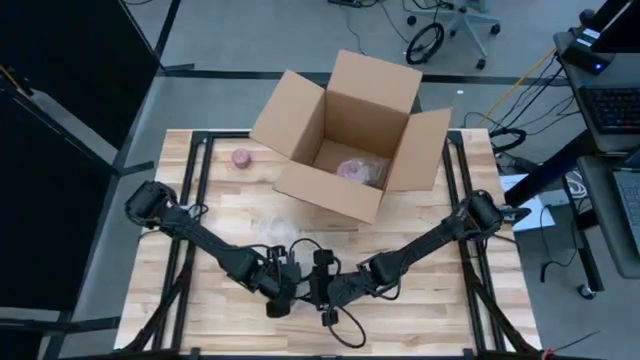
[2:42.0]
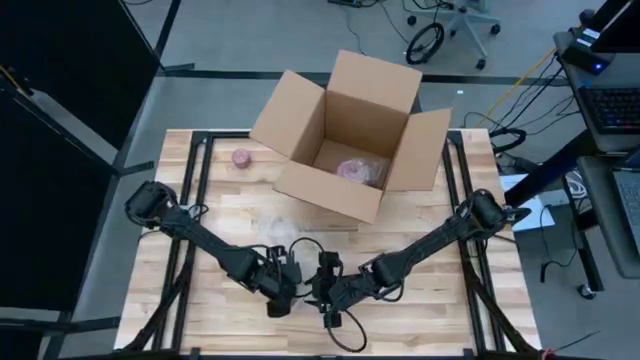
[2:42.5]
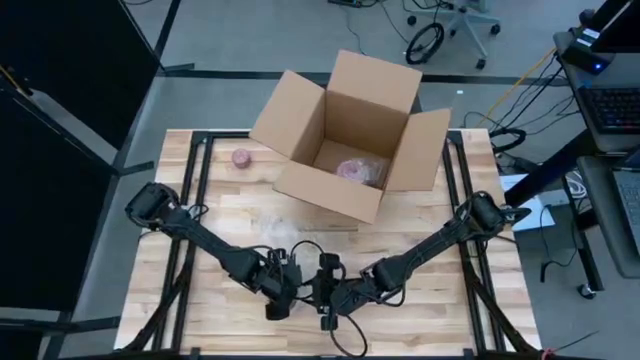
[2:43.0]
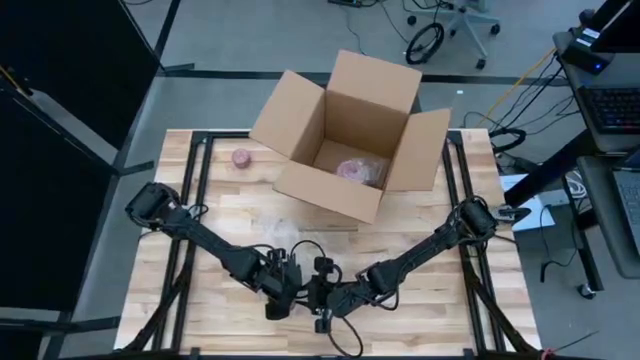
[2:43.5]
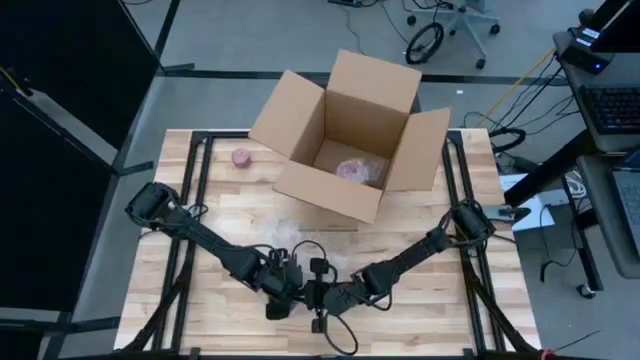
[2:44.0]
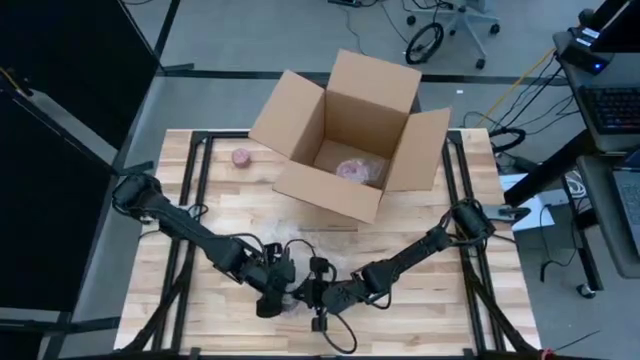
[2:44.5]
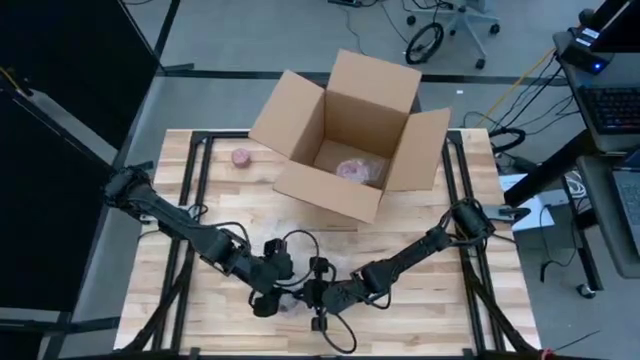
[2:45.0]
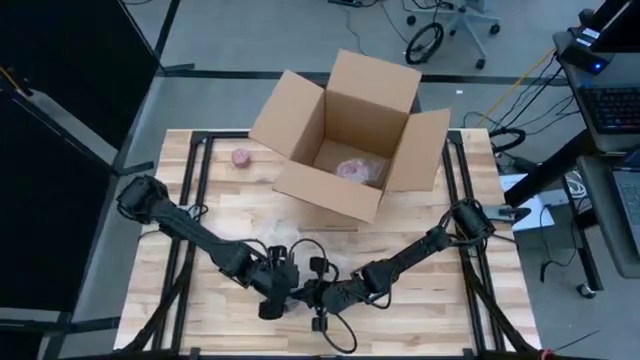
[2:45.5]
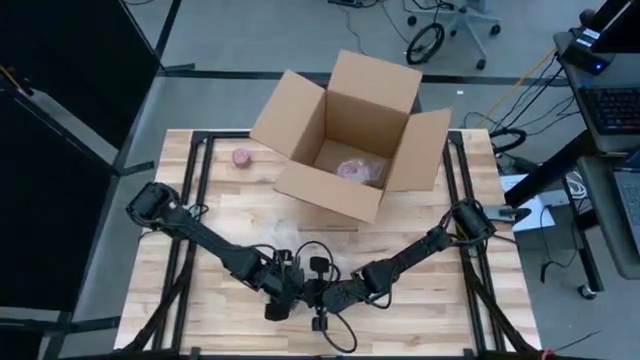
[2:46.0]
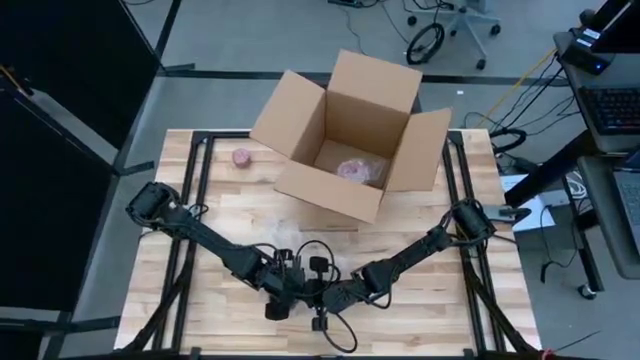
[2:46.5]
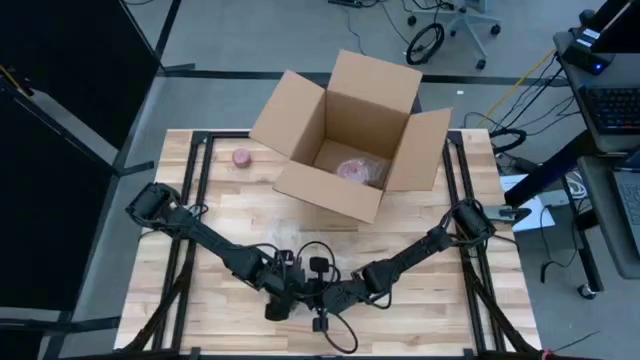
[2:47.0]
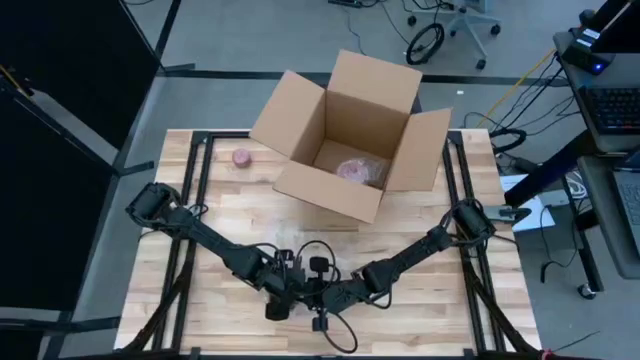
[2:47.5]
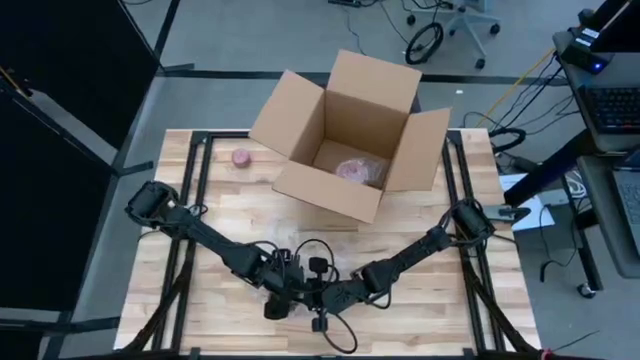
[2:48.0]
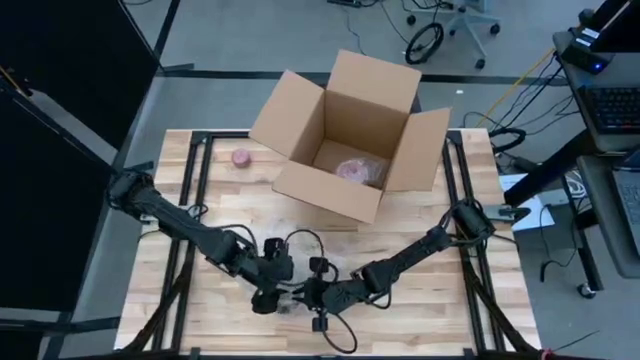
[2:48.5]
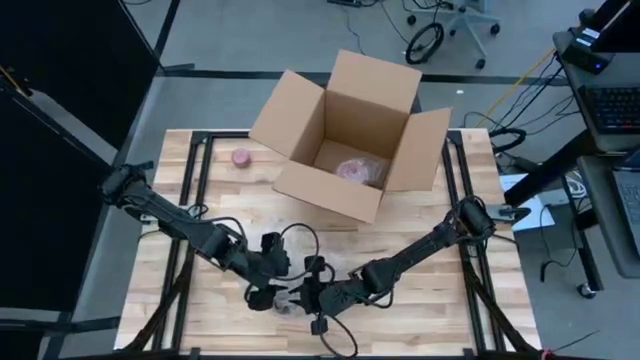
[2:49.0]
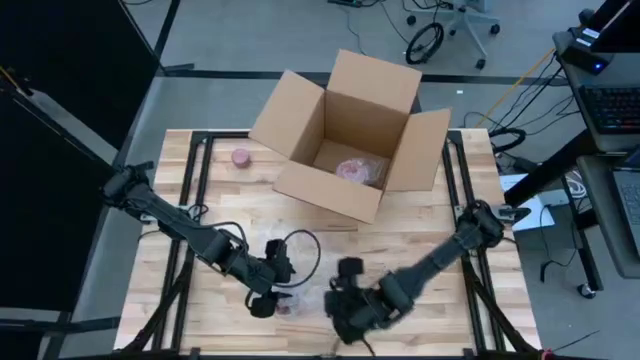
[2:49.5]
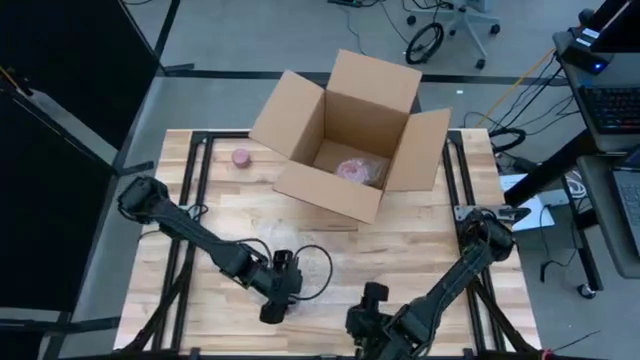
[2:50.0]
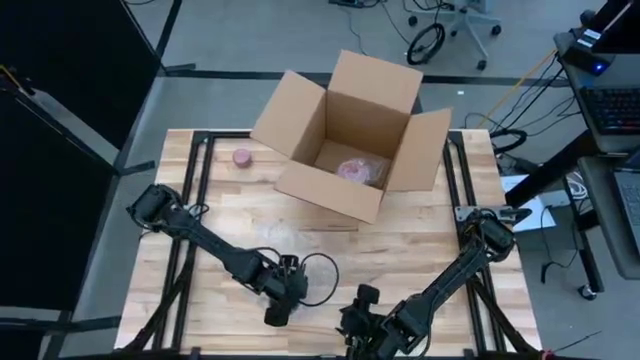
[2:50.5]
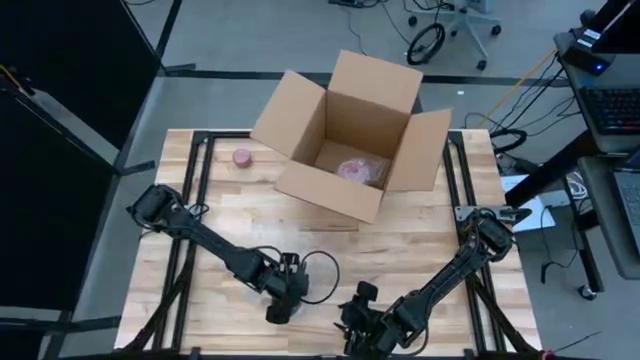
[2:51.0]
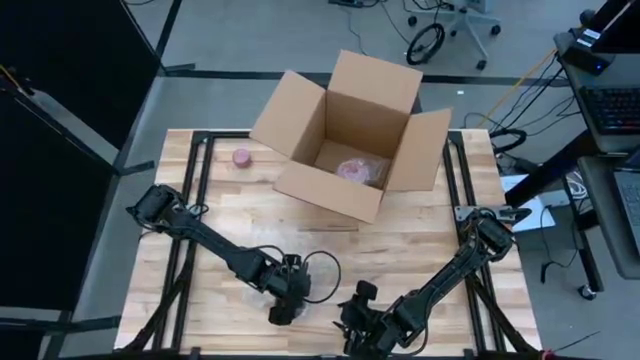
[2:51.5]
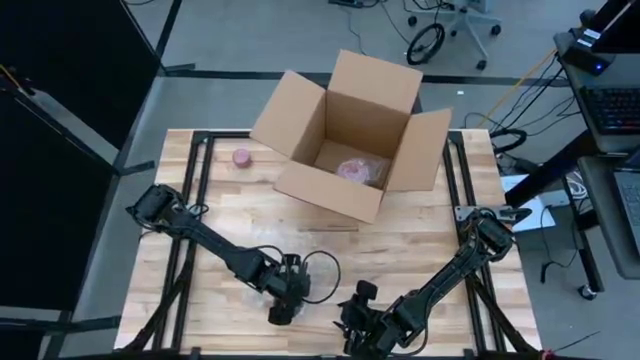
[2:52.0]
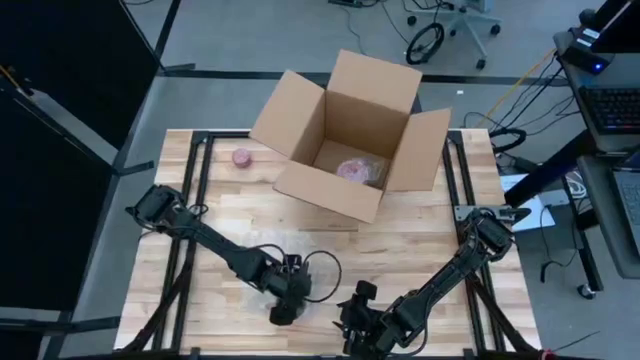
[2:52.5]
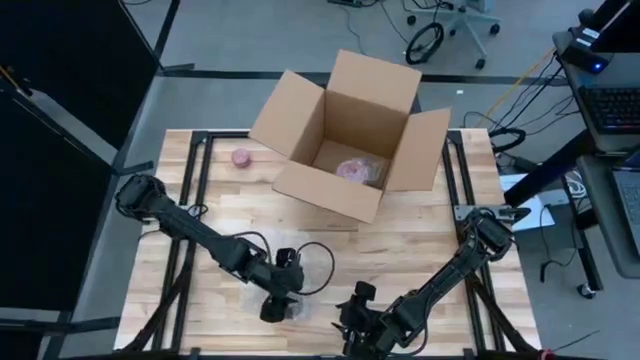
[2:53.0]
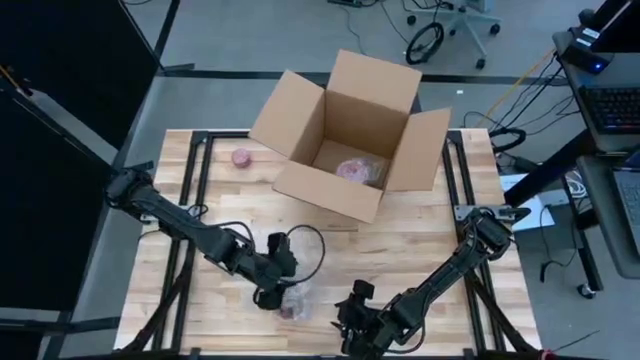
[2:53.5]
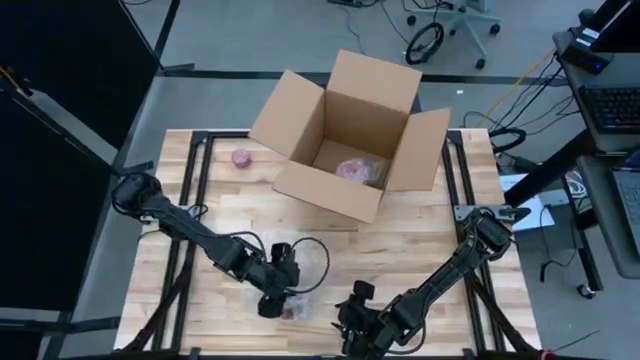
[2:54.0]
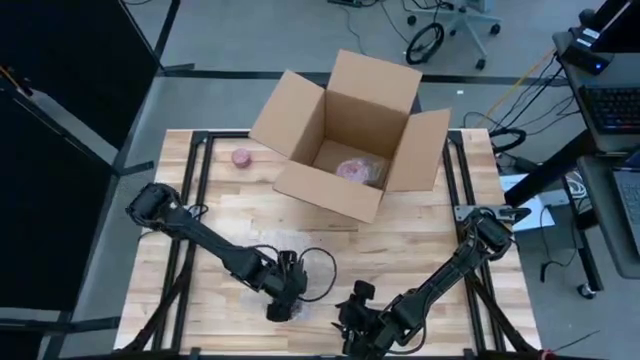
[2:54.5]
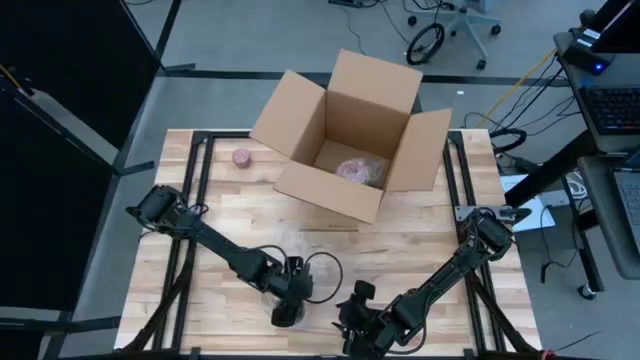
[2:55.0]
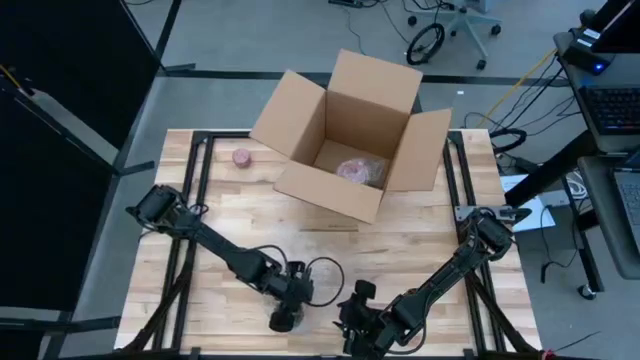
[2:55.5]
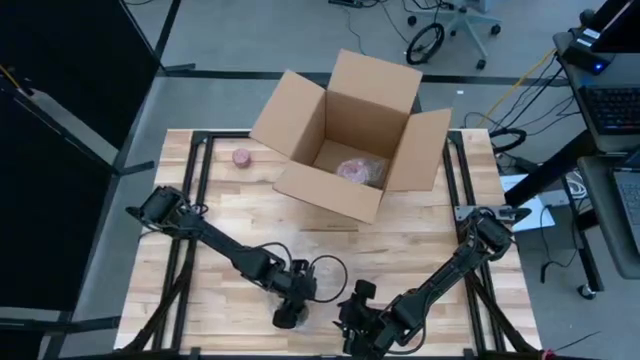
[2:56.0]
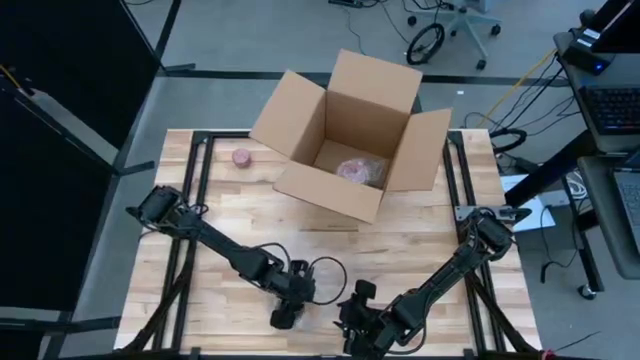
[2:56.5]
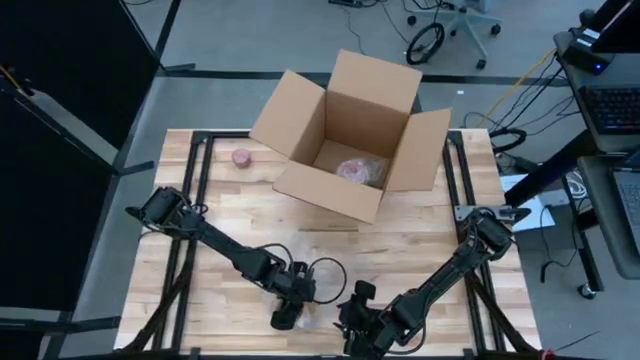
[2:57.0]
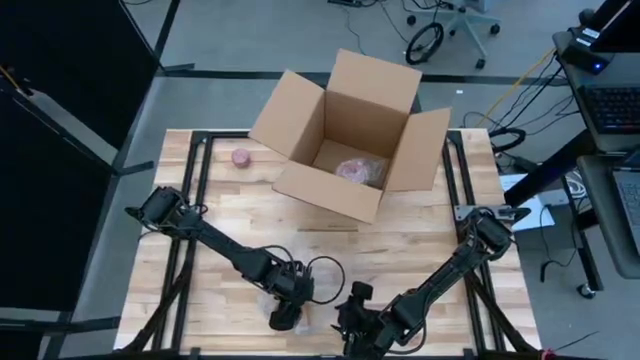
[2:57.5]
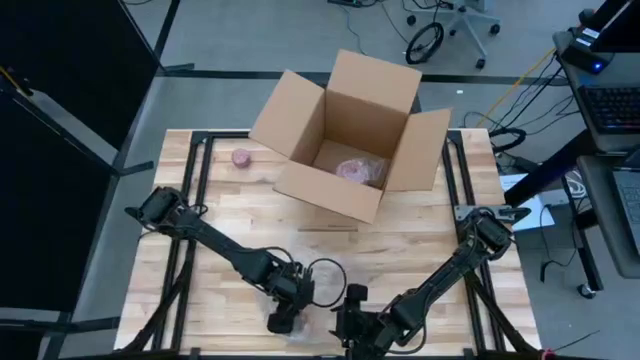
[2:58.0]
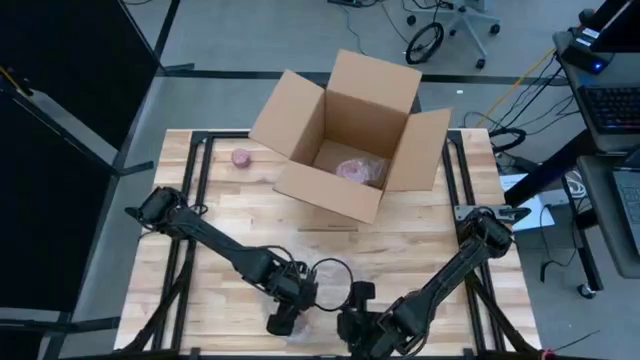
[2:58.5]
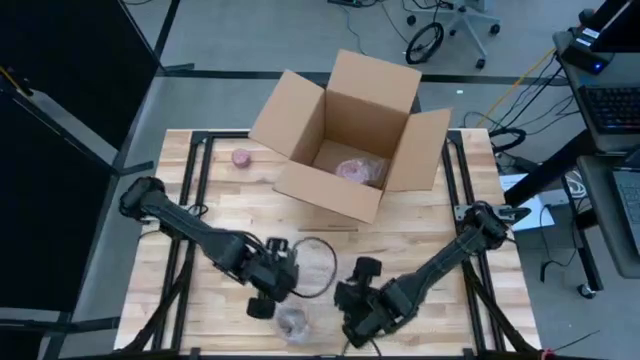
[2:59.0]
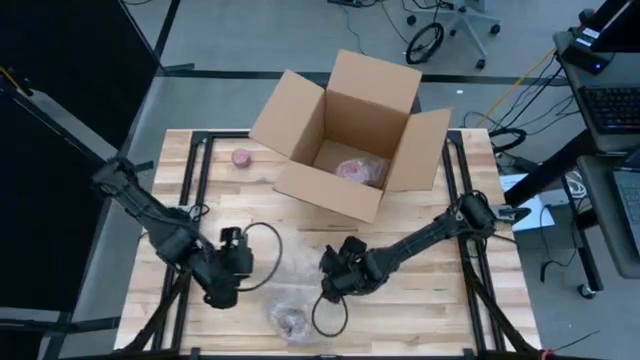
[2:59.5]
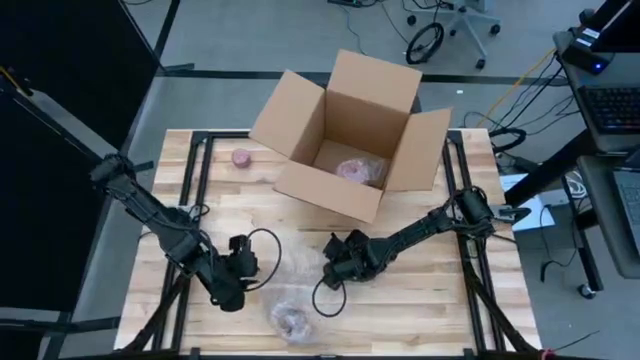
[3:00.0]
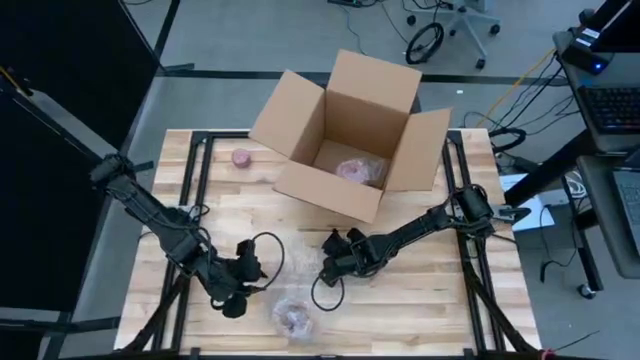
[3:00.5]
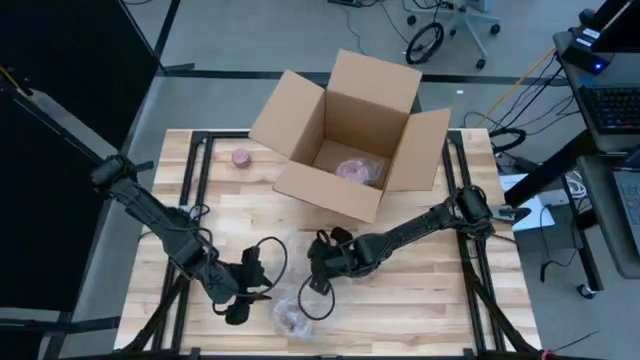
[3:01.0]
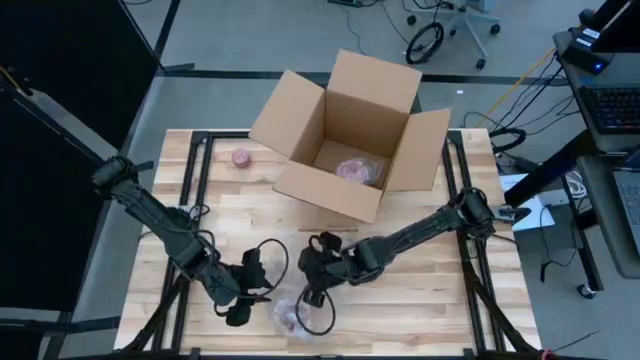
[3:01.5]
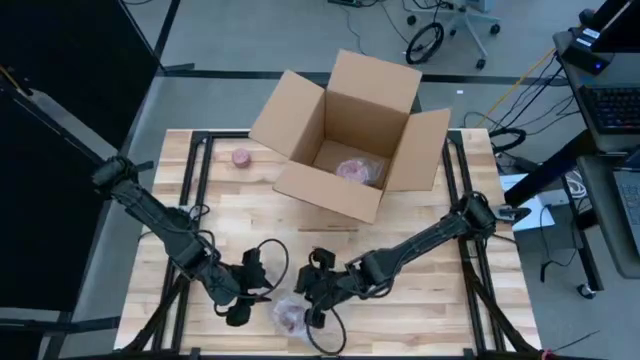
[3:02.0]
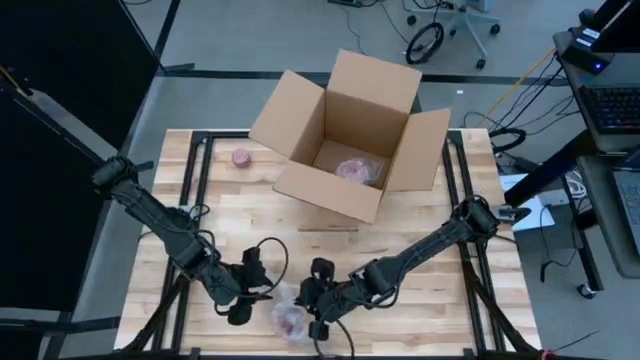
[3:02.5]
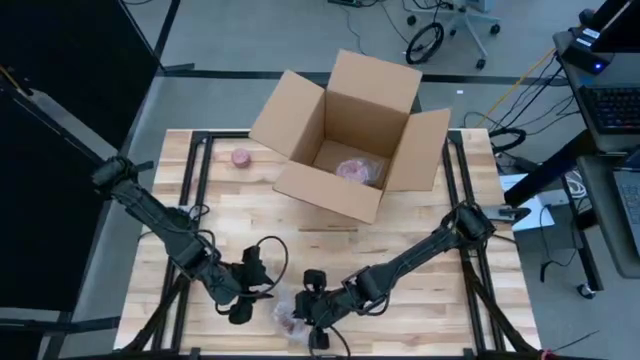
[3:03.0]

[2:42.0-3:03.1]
Task: wrap mug
Wrap the yellow mug in the bubble wrap
